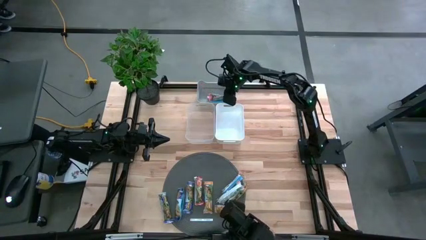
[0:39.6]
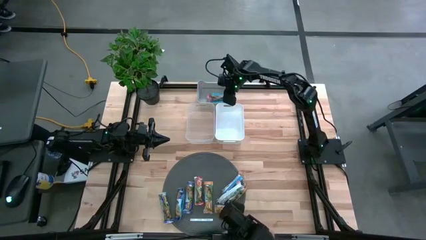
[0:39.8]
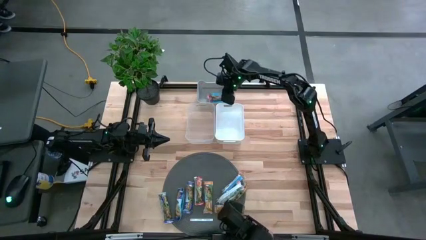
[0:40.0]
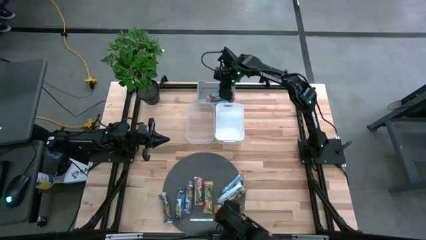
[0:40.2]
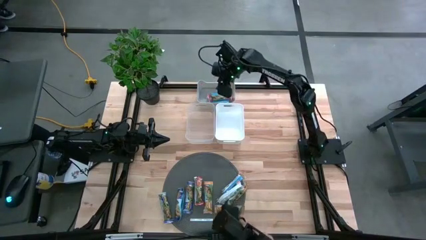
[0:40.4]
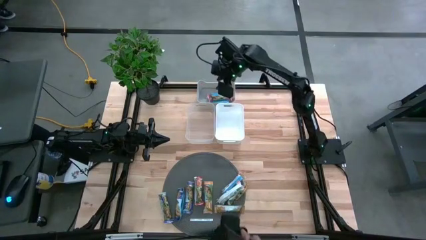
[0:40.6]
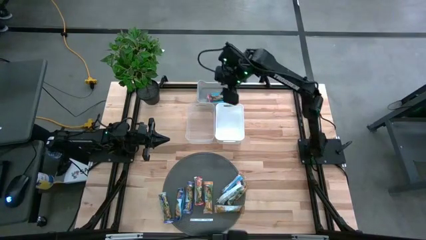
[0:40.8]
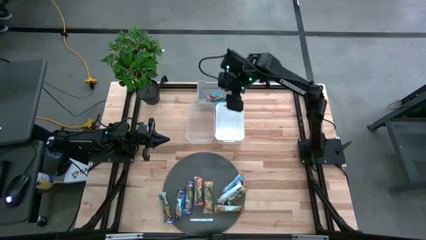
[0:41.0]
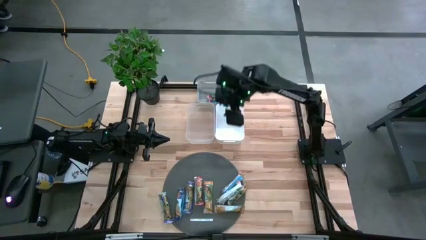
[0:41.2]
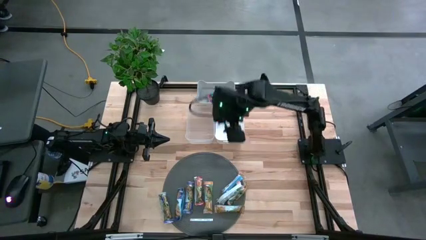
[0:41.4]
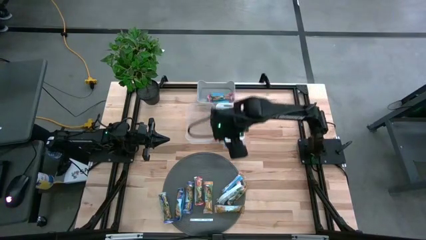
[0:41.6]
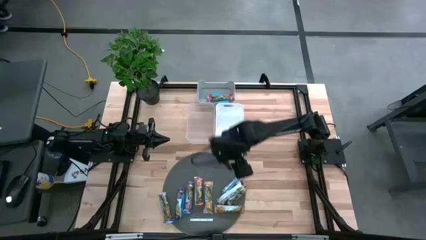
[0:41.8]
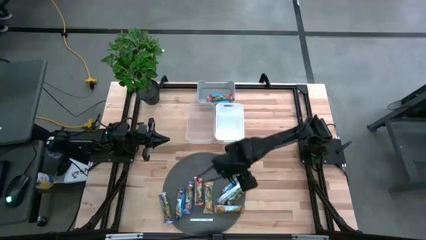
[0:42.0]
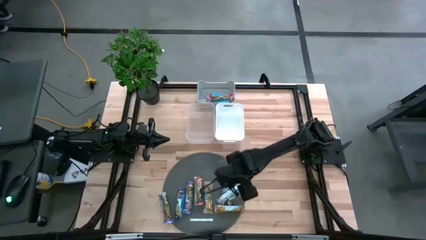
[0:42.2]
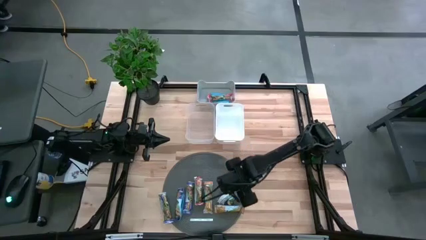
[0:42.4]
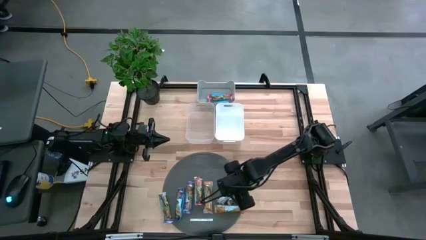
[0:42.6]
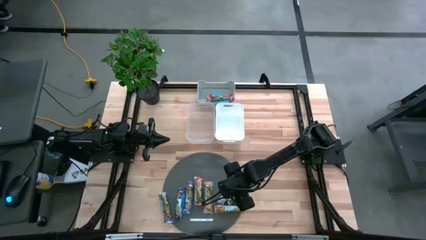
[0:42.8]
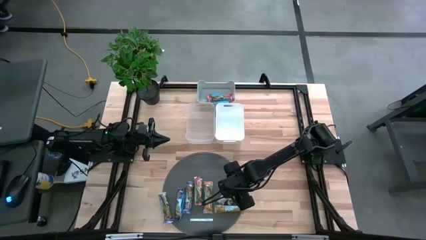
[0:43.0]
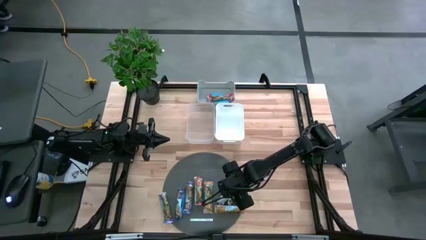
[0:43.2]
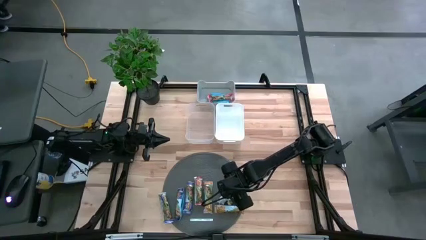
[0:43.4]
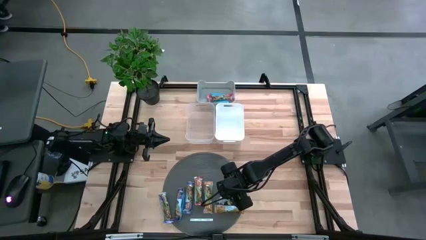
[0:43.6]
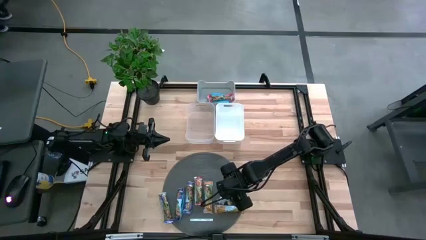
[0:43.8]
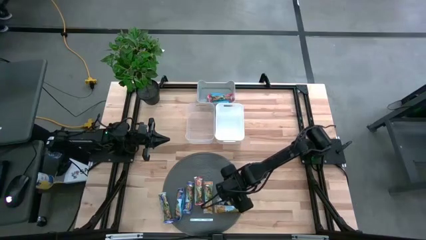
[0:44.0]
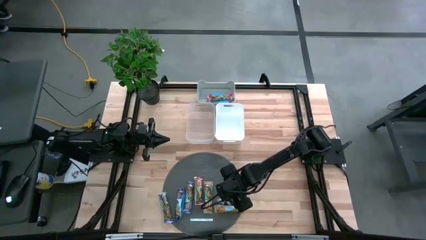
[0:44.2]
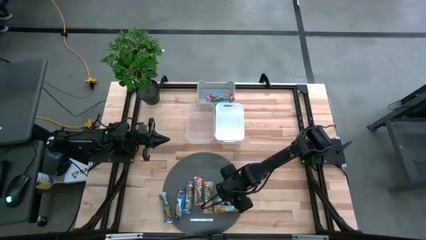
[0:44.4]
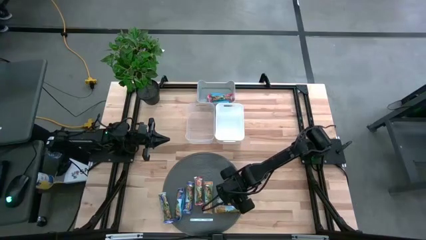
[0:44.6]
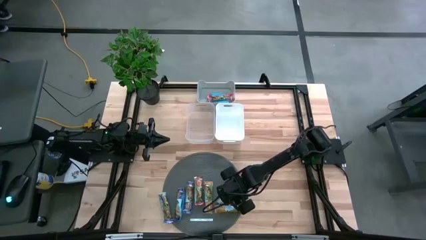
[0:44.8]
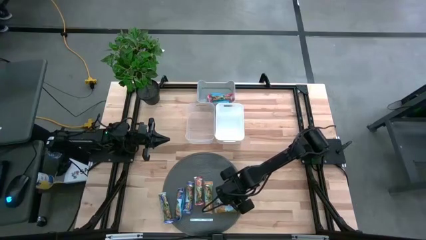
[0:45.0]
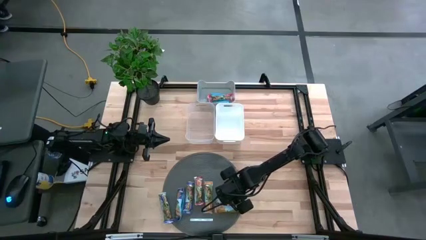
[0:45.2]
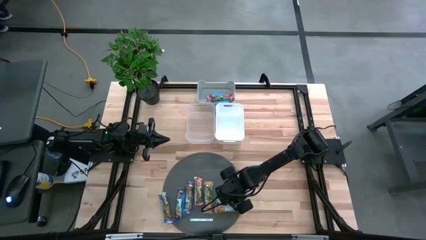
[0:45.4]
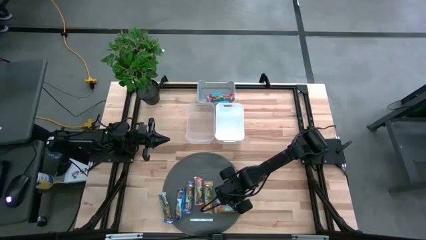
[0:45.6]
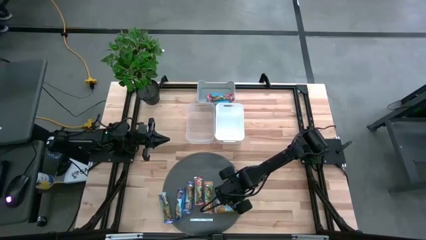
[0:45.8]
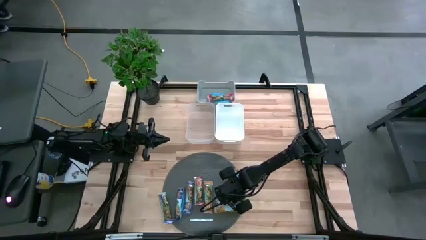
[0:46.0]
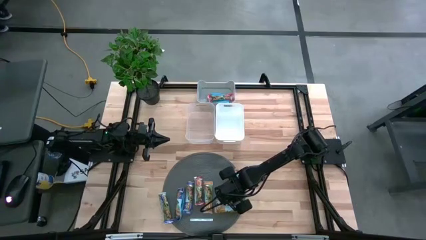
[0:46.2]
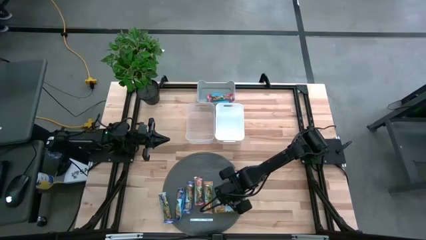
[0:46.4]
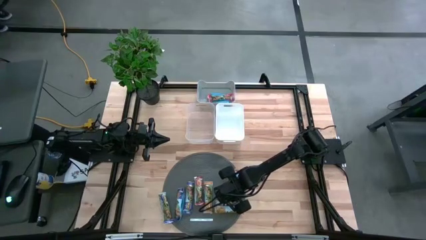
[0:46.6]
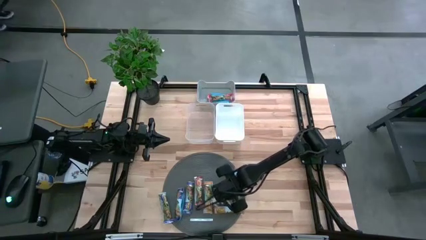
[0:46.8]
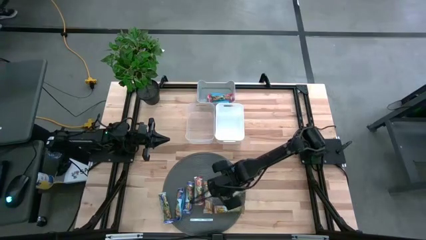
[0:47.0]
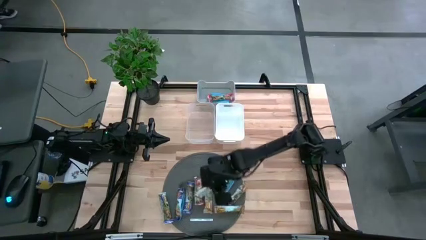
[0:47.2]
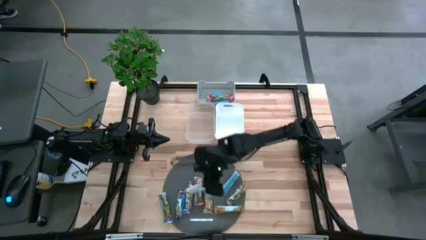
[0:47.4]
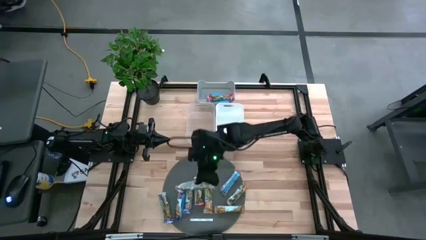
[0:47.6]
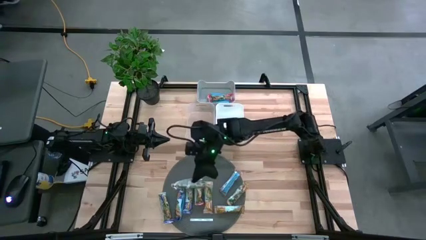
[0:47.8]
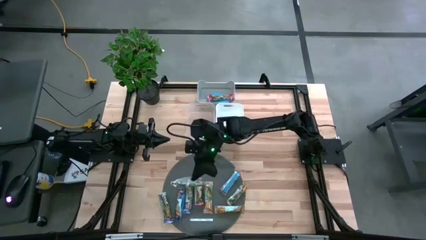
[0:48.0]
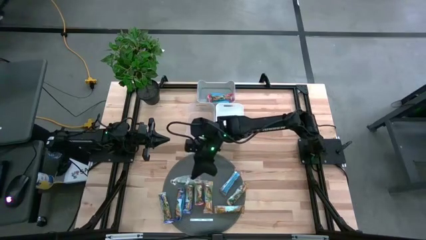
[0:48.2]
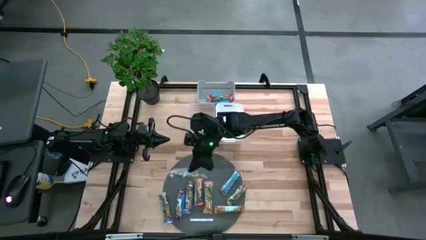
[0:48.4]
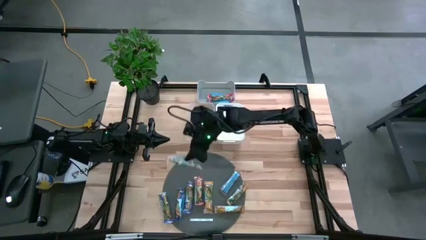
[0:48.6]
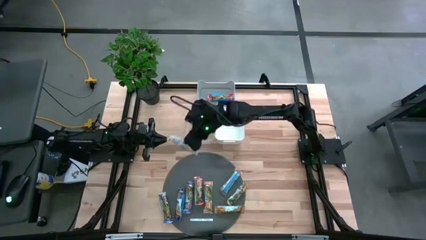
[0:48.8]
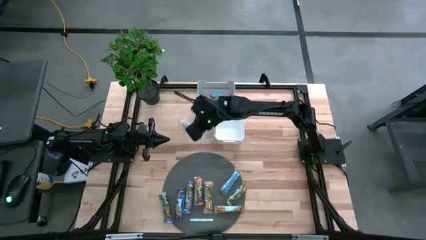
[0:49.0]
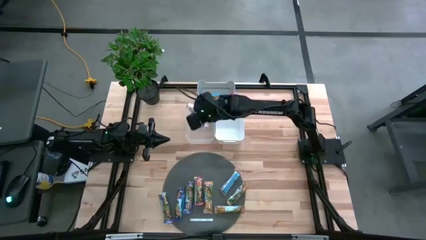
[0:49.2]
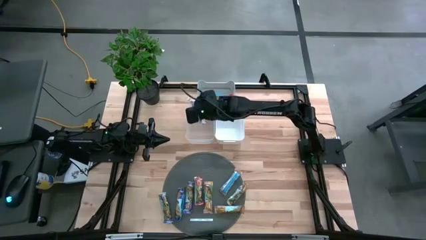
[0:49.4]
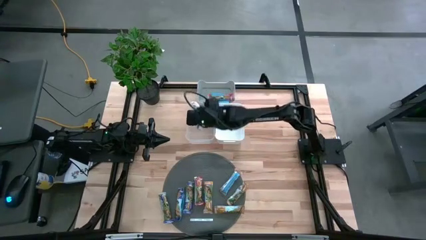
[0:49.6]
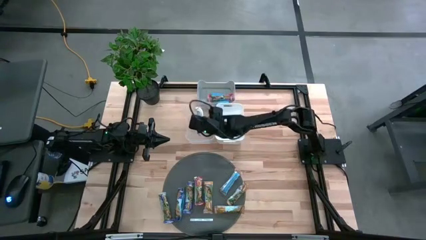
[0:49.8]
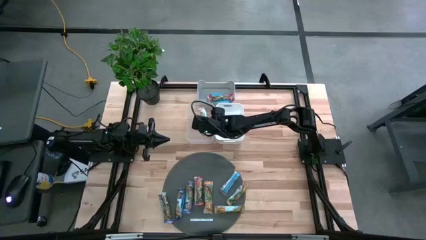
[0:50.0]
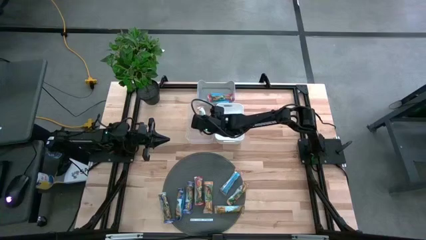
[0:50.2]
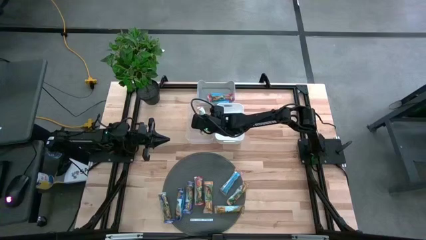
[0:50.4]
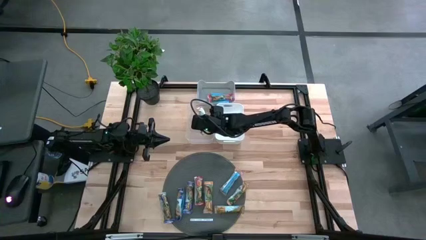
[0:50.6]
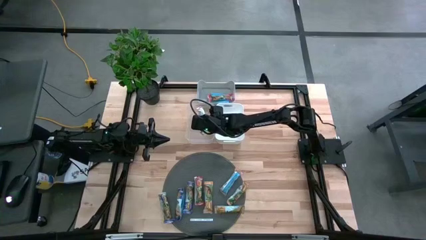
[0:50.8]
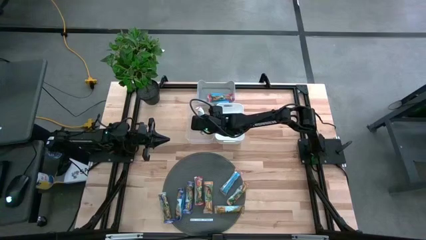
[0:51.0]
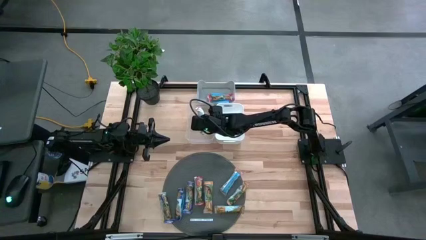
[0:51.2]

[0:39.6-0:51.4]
Task: Pick and place Granola Bars by type
Put the yellow granola bar into the transparent bin

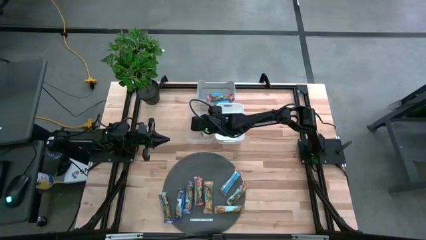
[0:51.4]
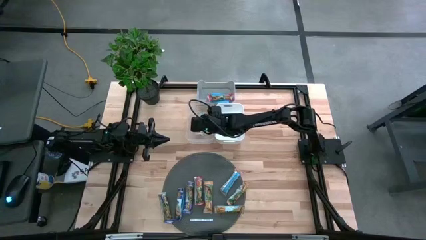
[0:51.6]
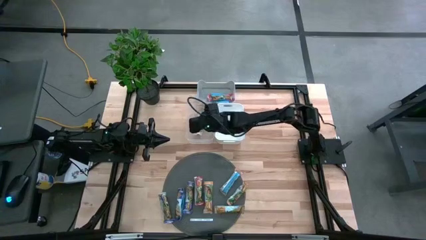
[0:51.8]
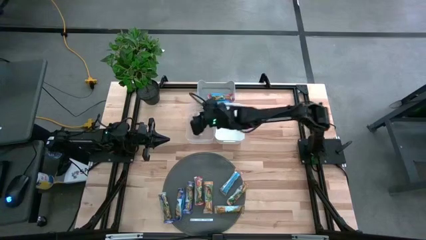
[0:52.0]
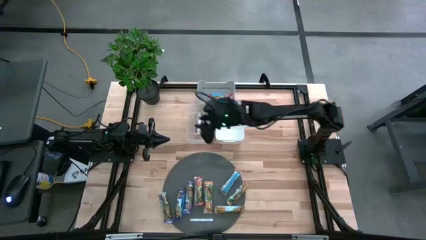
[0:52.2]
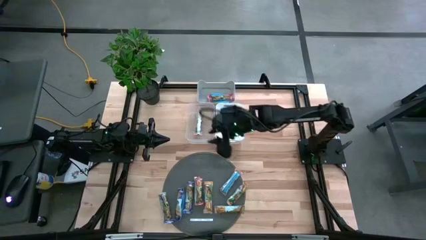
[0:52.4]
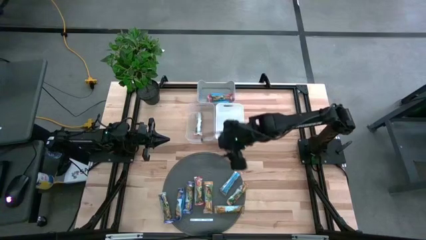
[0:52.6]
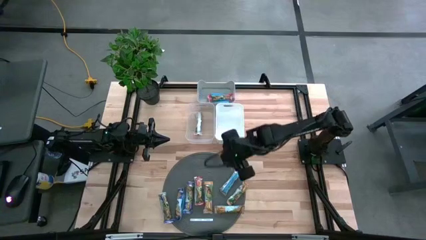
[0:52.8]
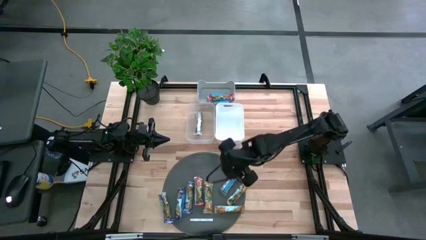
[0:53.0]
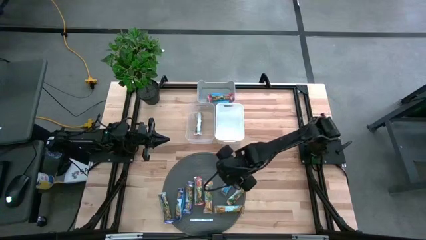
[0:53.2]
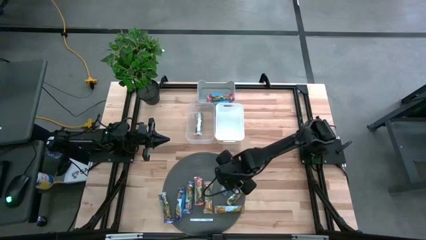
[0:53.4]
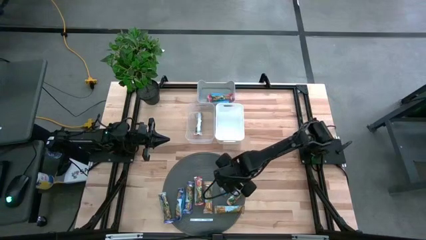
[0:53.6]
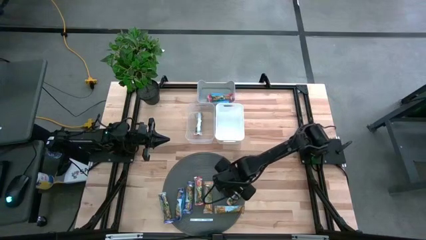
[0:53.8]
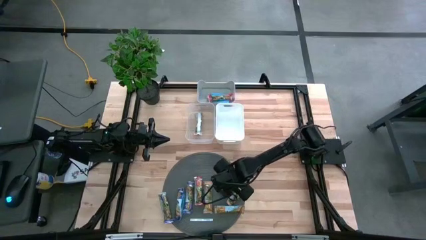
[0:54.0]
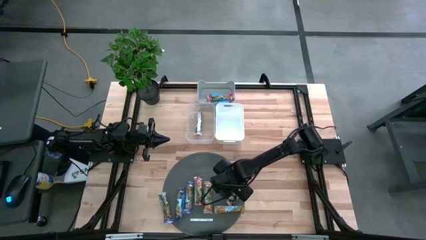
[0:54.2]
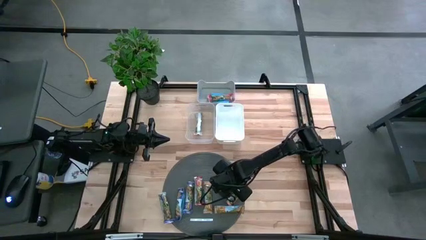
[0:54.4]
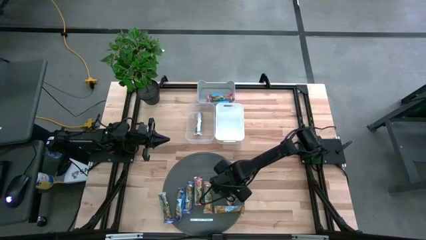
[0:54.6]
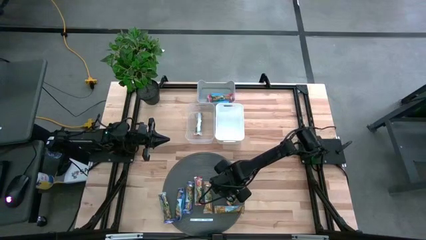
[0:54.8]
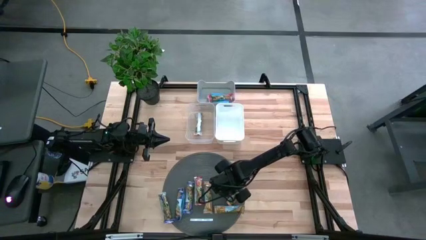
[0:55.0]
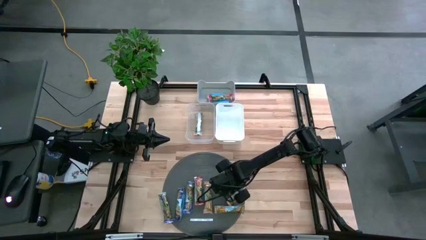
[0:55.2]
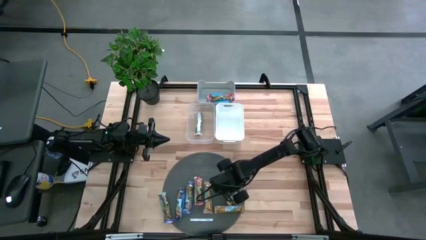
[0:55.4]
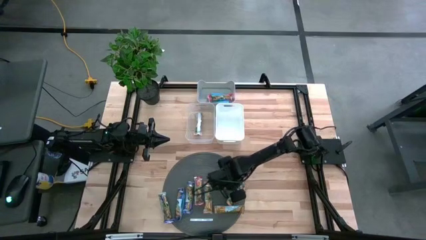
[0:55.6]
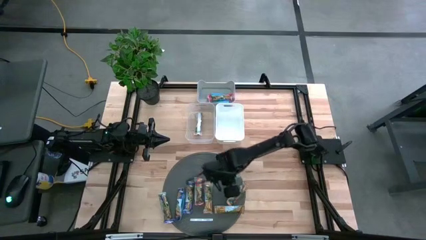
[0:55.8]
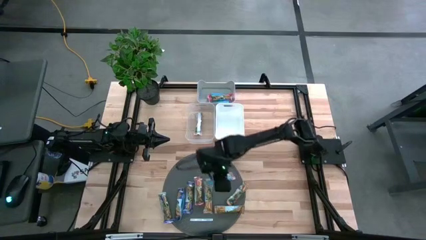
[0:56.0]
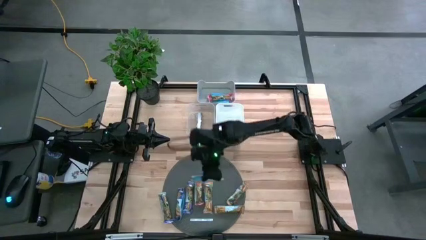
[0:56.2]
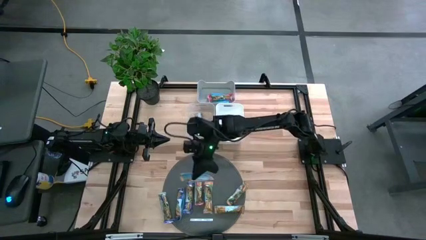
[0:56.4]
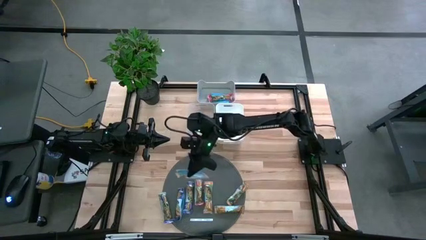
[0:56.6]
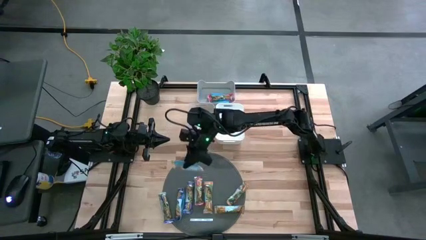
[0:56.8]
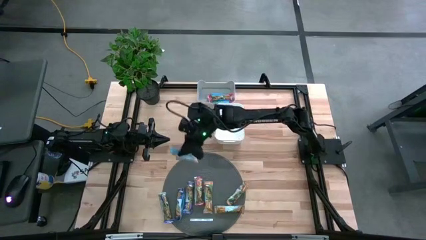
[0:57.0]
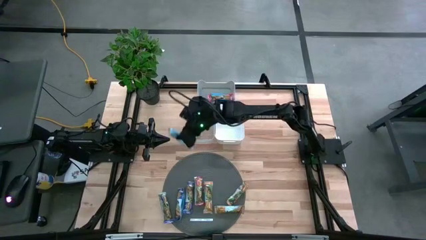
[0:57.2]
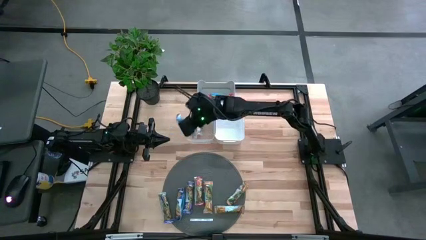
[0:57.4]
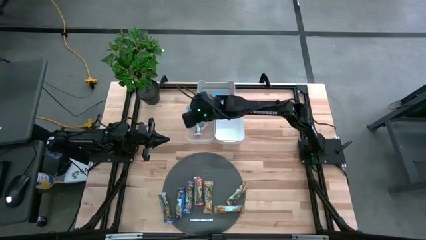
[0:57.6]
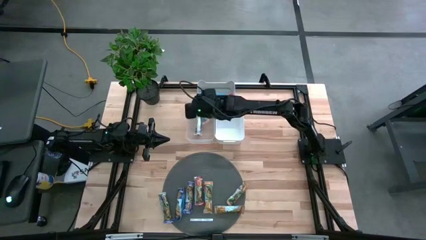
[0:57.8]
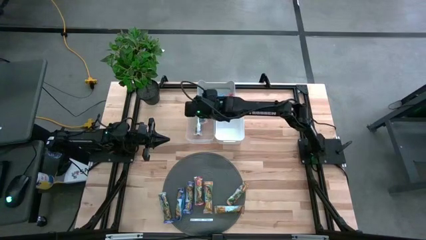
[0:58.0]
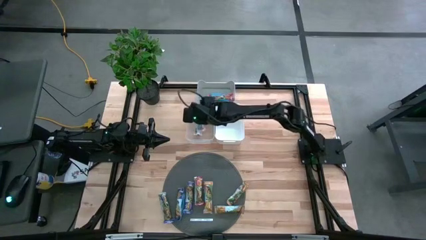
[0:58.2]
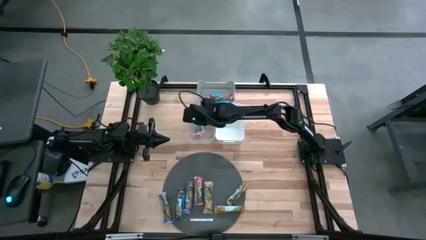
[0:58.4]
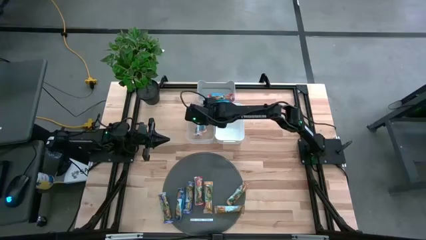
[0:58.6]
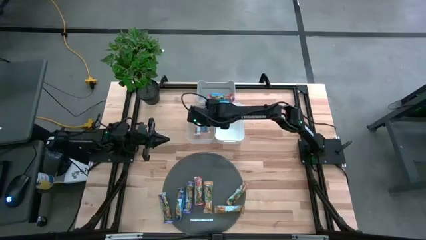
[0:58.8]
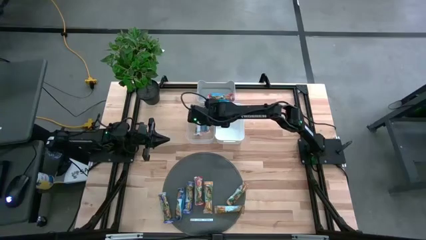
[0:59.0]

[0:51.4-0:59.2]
Put the yellow granola bar into the transparent bin
